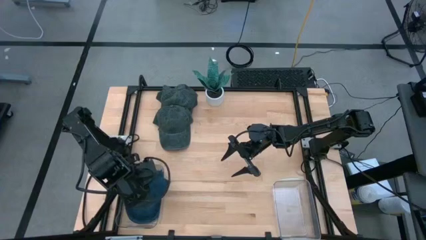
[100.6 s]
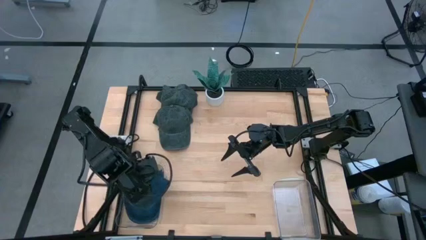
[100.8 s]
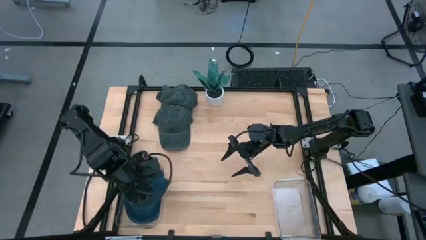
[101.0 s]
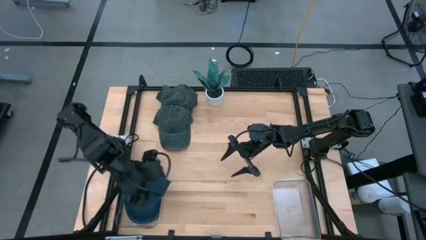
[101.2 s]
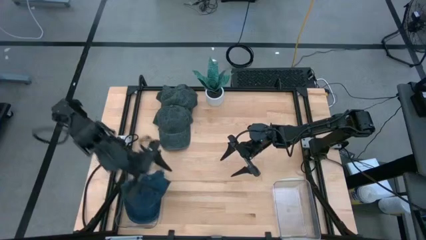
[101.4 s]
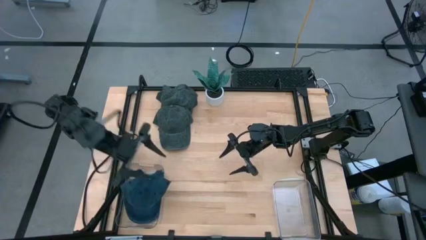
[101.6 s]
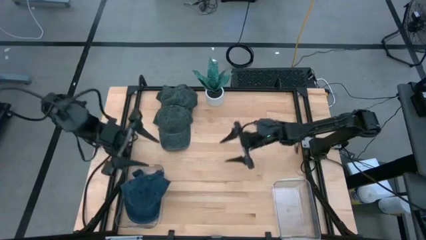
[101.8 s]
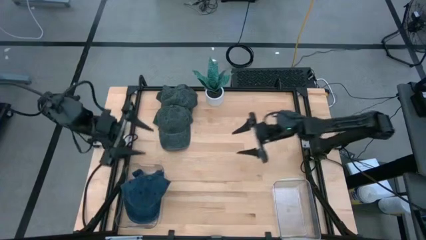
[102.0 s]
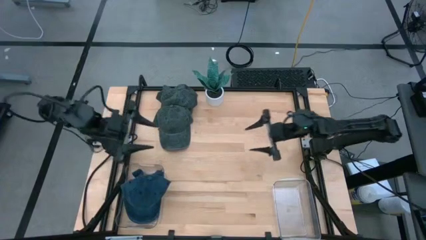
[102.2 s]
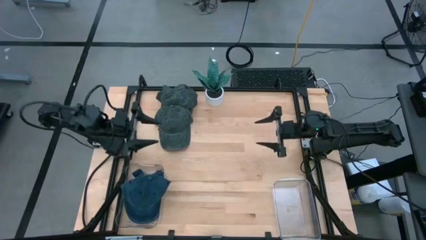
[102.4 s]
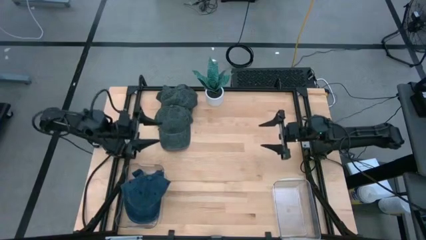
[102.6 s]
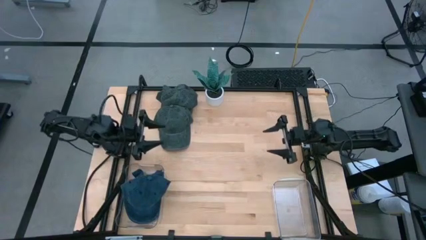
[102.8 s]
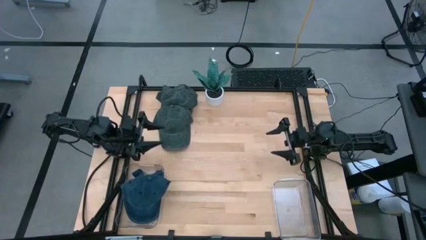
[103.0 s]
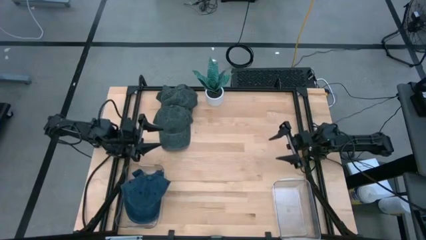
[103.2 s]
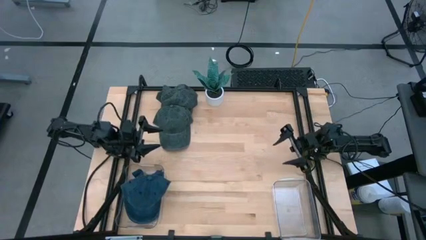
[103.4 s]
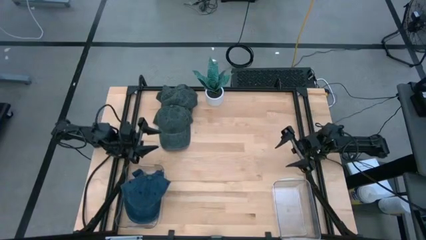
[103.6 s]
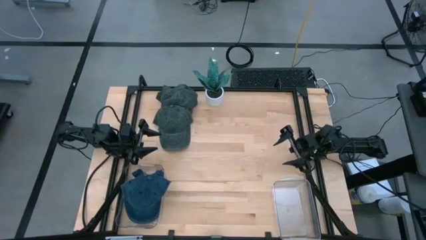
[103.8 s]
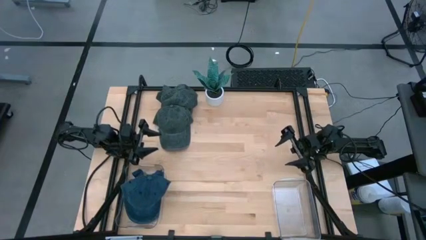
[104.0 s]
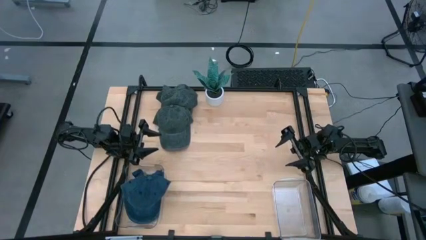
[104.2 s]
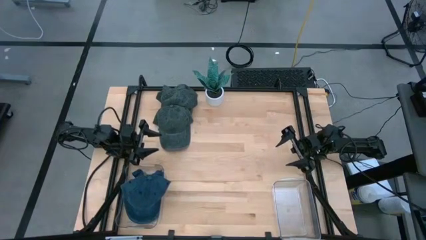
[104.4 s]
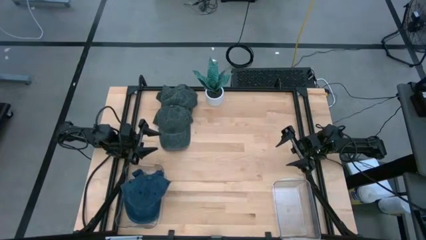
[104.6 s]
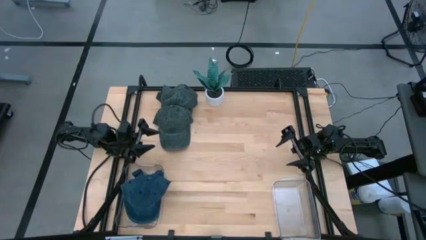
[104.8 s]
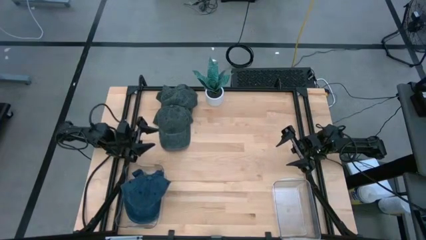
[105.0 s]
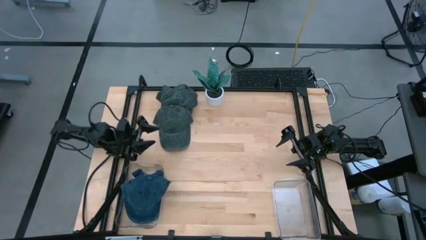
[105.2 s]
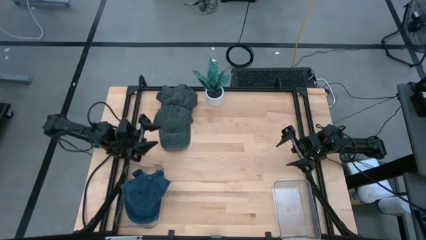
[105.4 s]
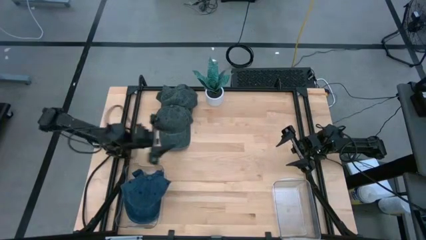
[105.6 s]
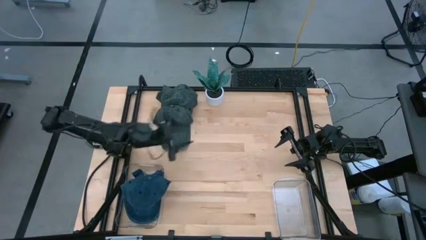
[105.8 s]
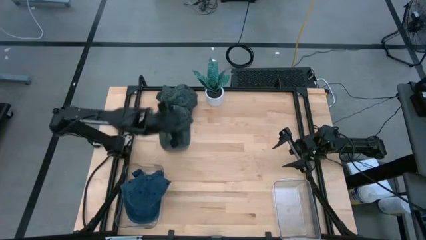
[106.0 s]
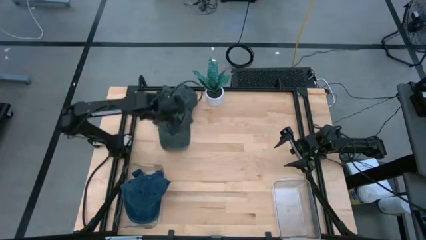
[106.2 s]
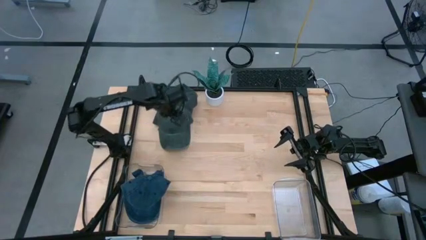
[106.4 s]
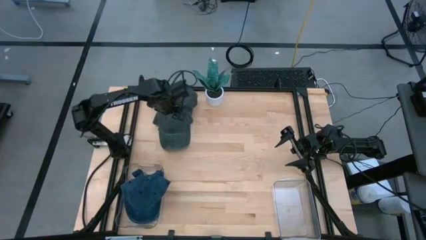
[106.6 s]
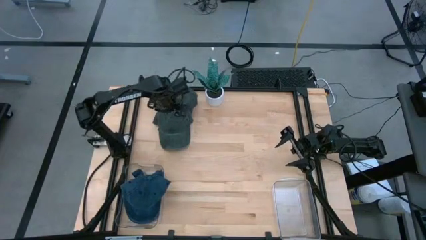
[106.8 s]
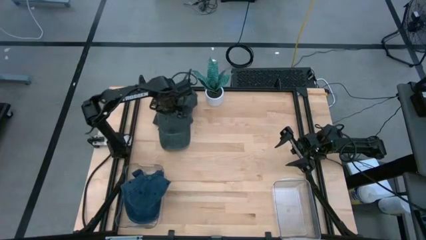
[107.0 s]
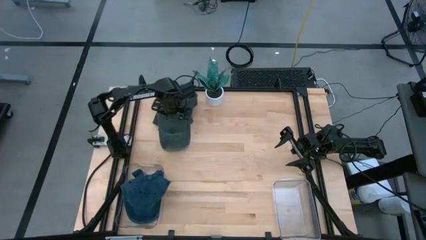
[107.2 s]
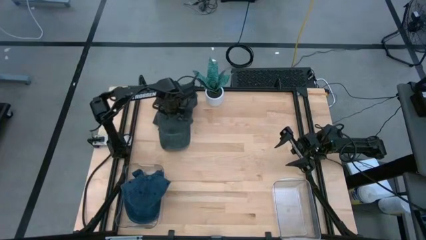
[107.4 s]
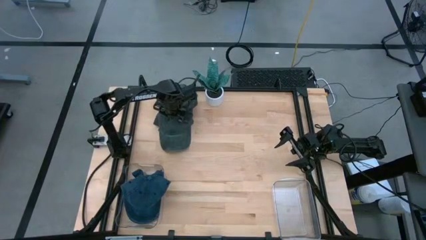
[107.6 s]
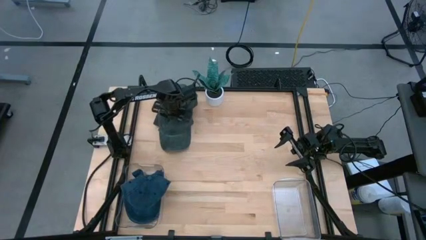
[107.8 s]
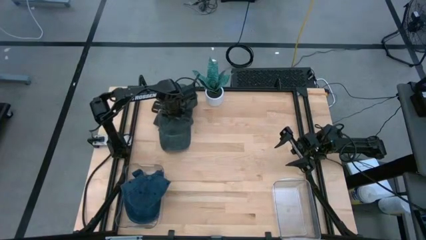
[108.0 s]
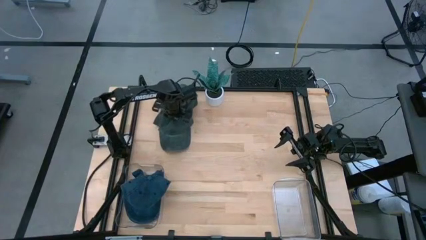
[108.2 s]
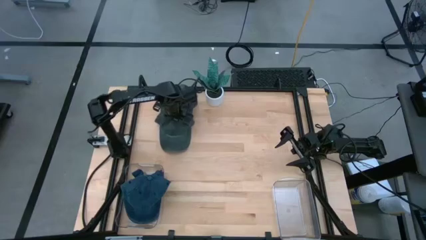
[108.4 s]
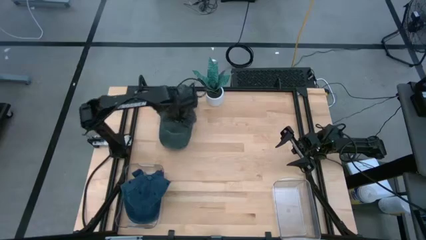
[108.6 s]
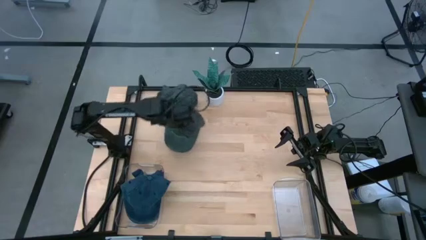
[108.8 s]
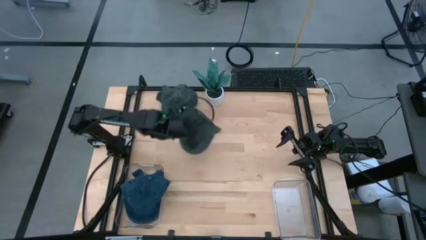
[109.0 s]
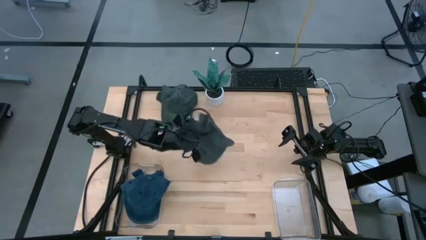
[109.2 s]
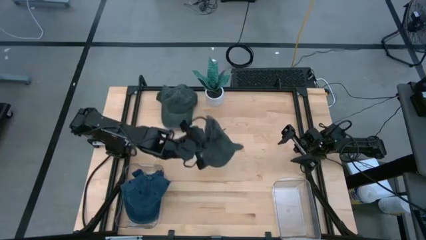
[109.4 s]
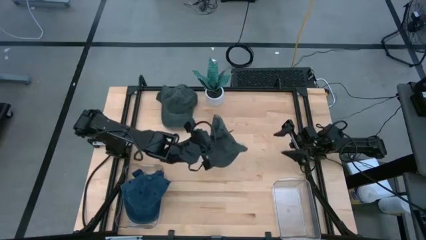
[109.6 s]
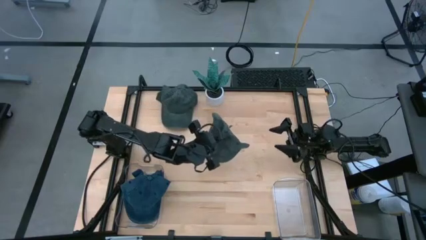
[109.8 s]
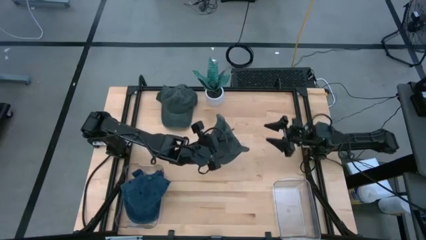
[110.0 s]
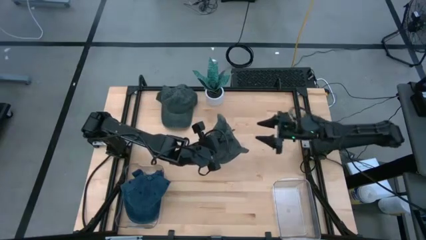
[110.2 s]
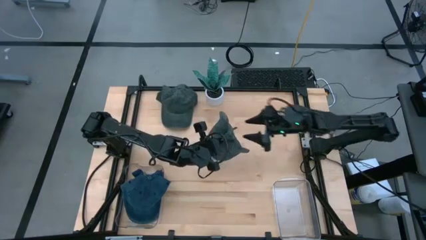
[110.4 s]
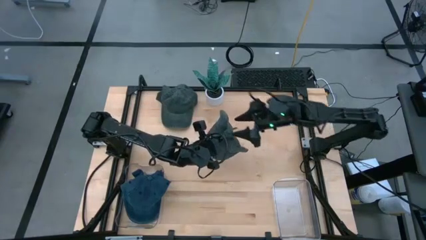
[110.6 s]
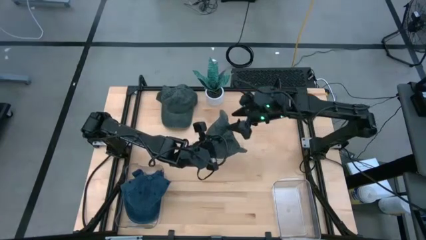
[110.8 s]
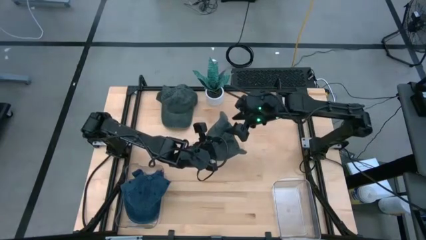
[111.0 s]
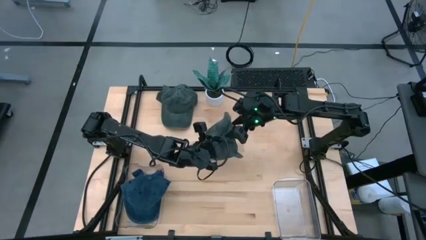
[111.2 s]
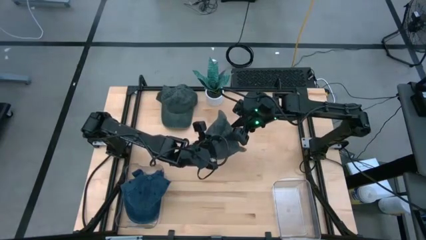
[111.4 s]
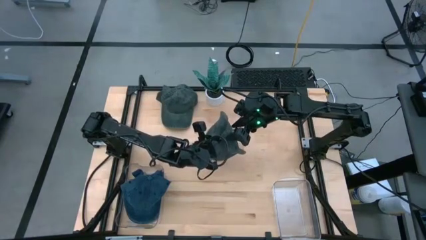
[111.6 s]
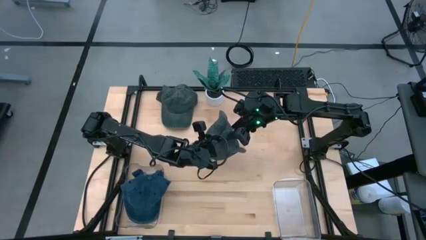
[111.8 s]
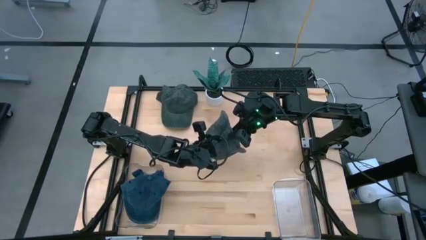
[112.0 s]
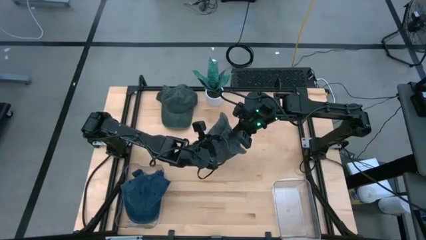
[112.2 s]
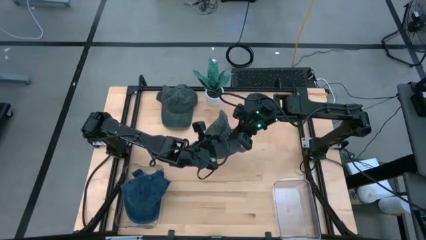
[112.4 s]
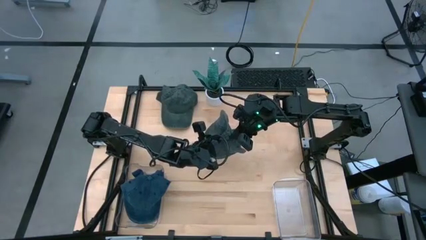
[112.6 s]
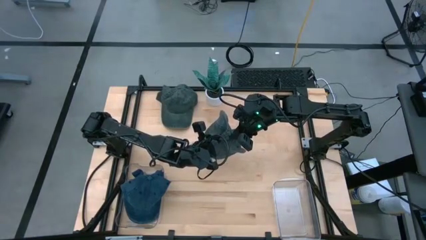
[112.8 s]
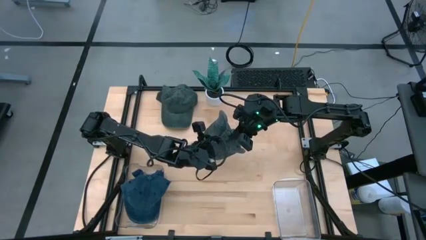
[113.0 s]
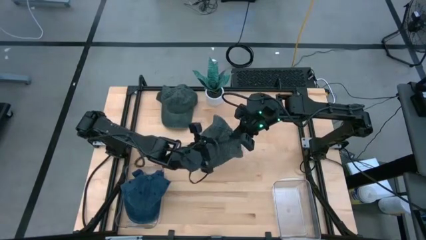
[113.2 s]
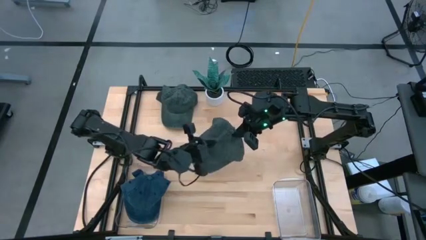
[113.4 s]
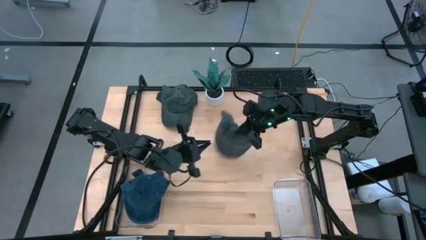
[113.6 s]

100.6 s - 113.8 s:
Task: Pick & Place hat
Put the bottom gray cap into the right transparent bin

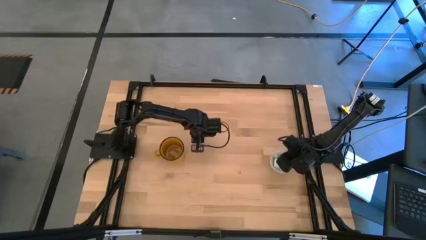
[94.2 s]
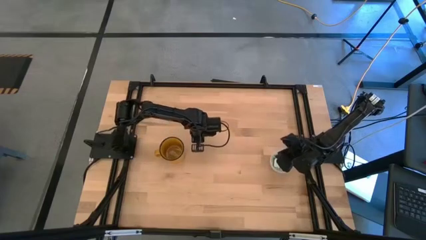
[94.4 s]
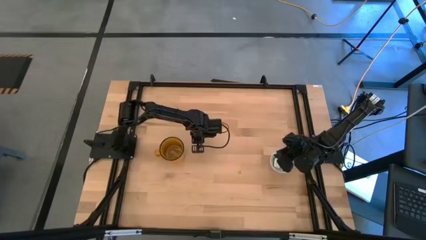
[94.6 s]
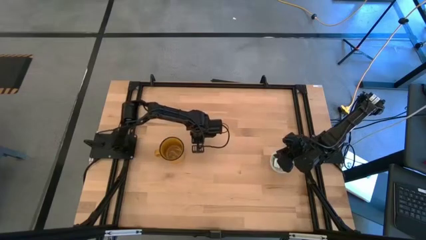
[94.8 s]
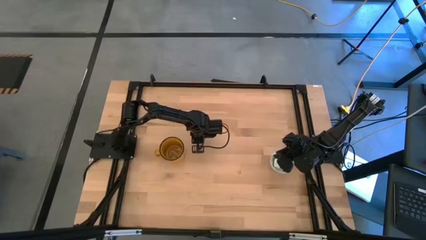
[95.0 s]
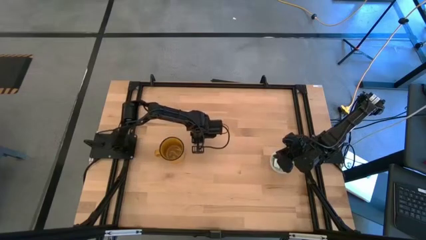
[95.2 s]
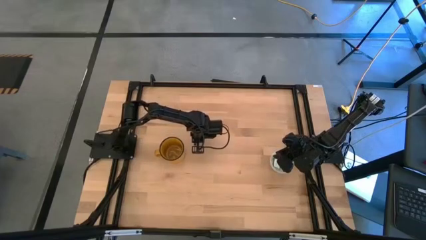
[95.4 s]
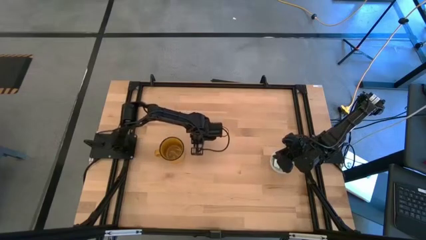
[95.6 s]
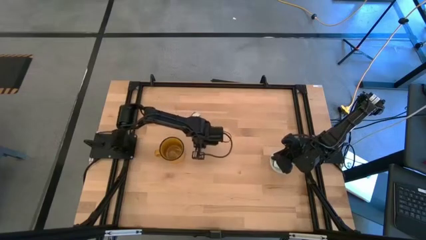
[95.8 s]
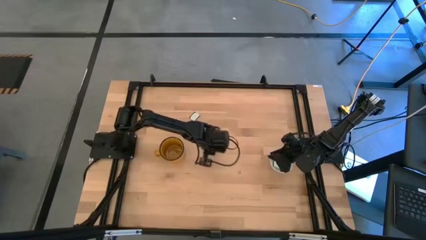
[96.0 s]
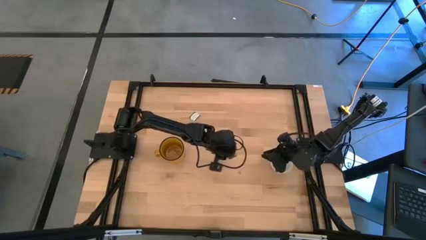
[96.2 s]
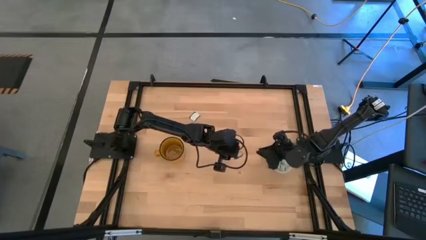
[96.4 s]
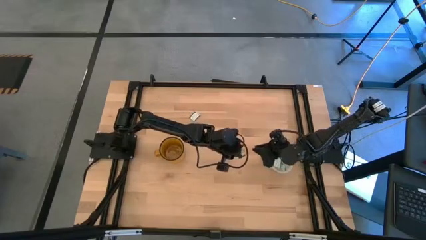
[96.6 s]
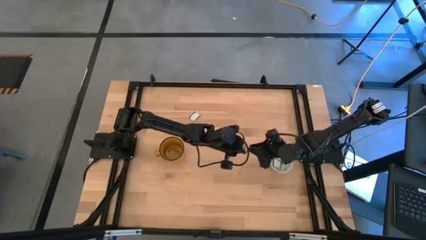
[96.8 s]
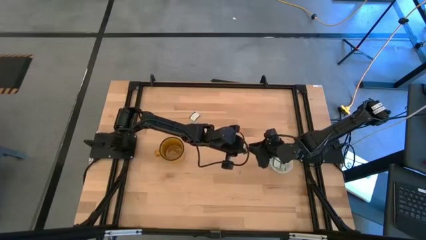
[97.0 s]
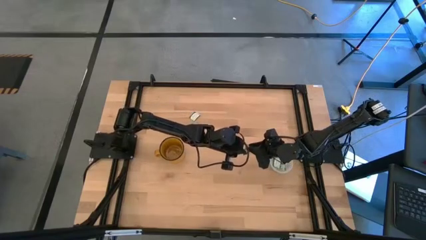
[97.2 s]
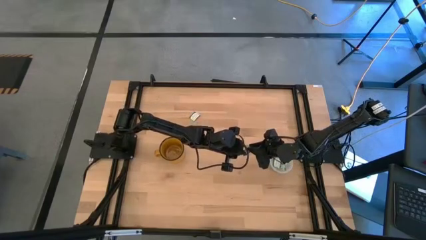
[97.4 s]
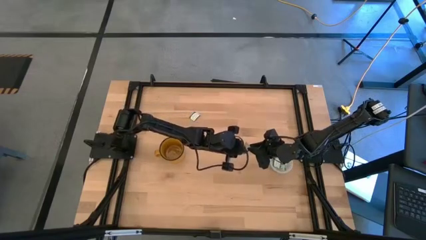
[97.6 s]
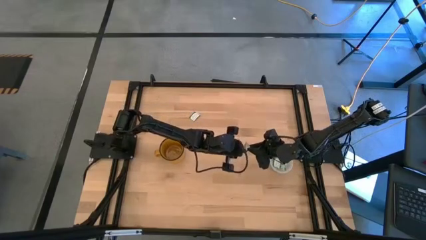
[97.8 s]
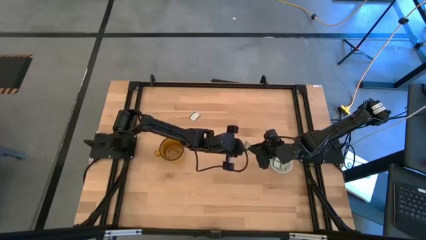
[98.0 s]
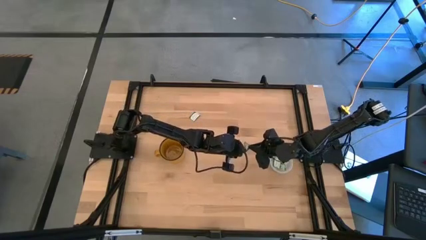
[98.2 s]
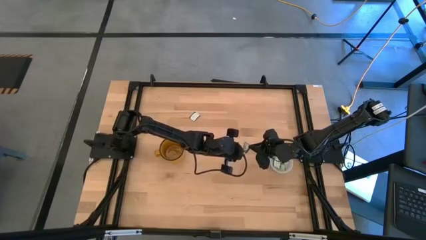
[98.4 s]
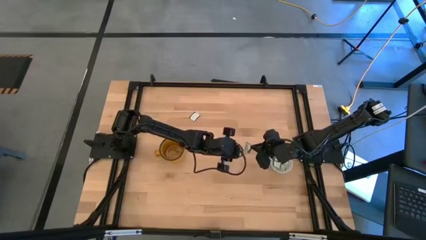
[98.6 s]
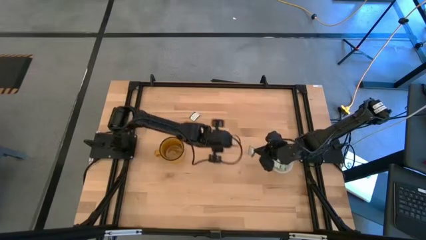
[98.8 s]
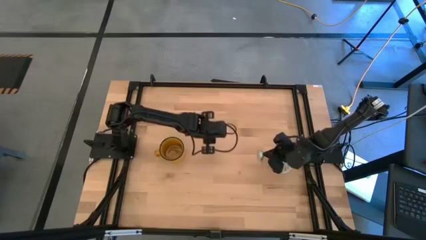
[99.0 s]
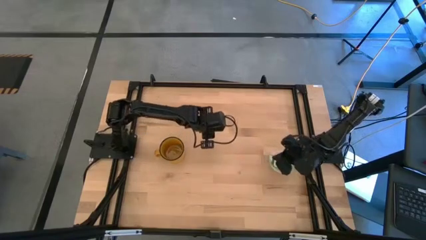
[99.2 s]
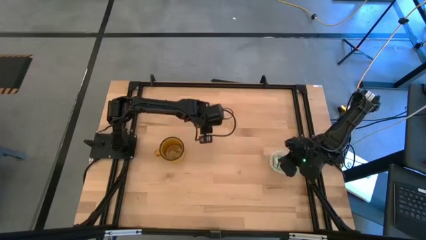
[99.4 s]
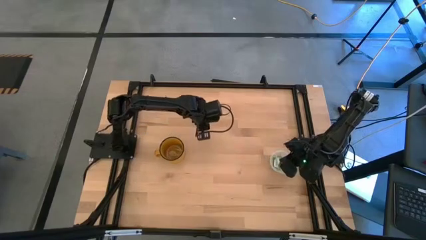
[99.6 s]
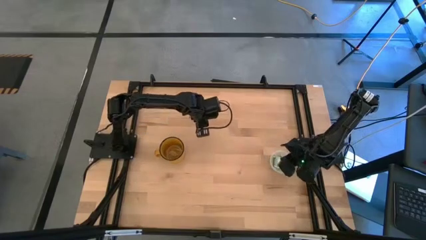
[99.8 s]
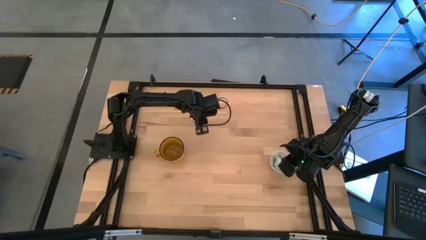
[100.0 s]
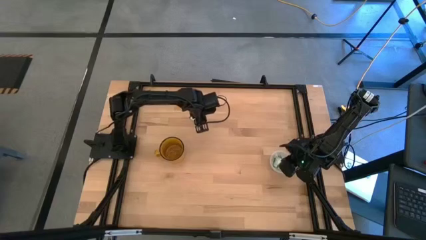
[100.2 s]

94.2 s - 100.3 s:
Task: Pick and place Stevia / Truvia into bins
Put the green stevia packet into the transparent container
